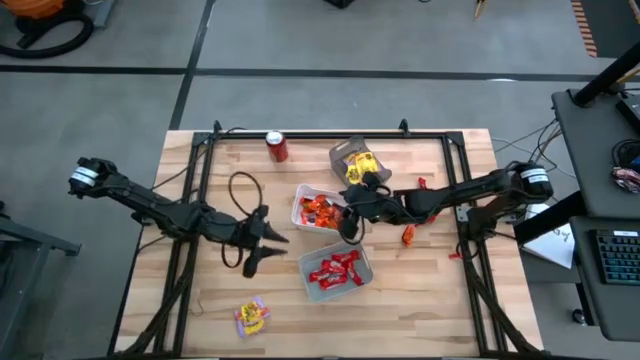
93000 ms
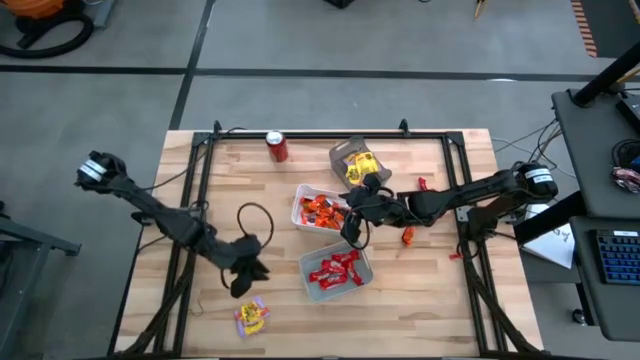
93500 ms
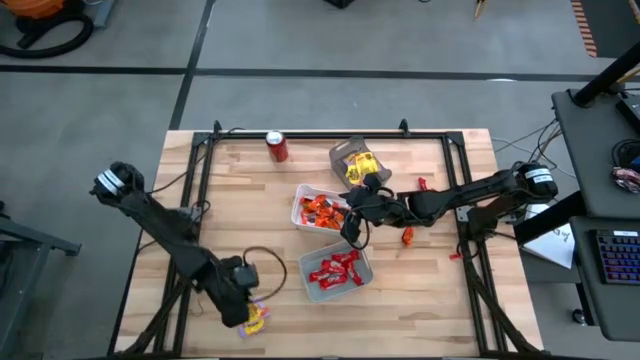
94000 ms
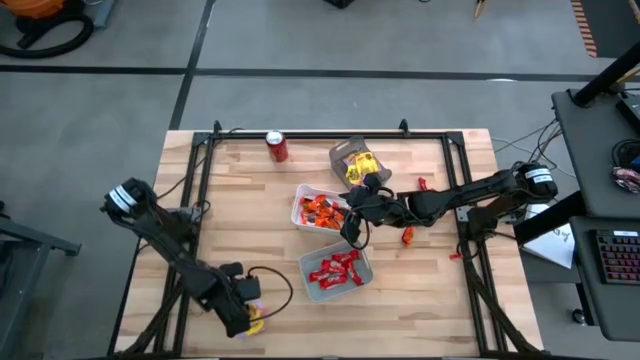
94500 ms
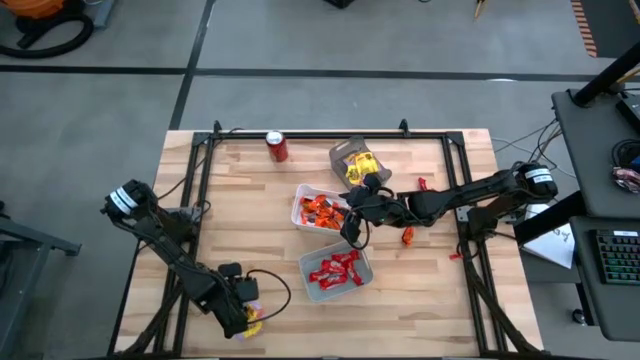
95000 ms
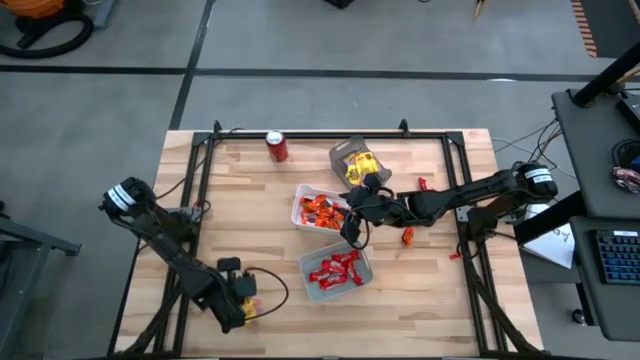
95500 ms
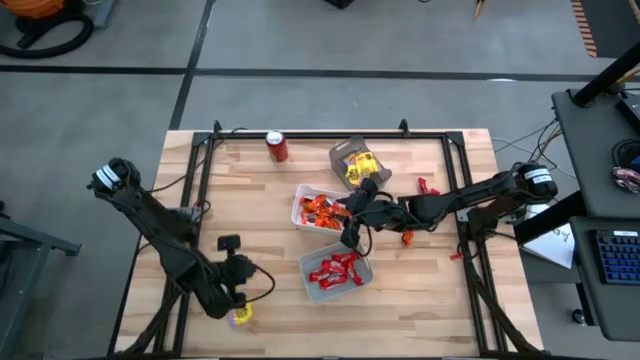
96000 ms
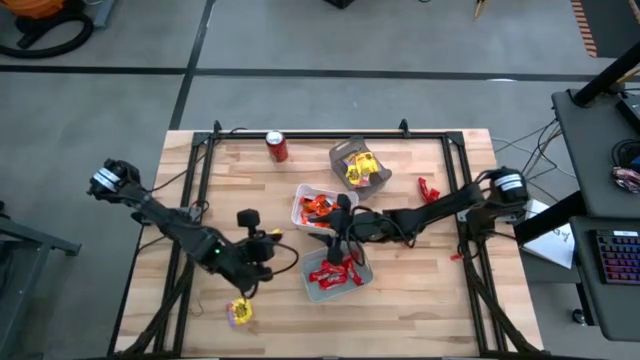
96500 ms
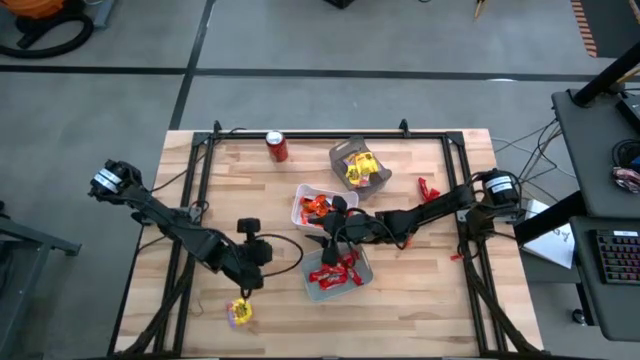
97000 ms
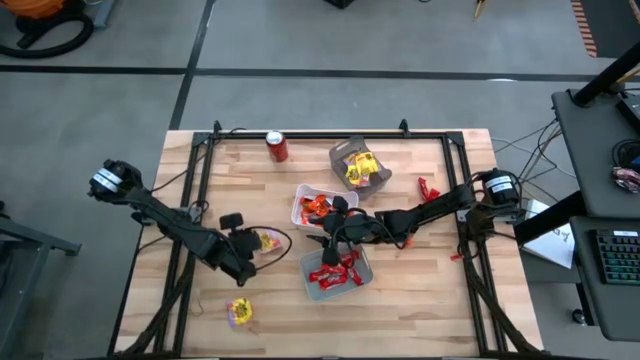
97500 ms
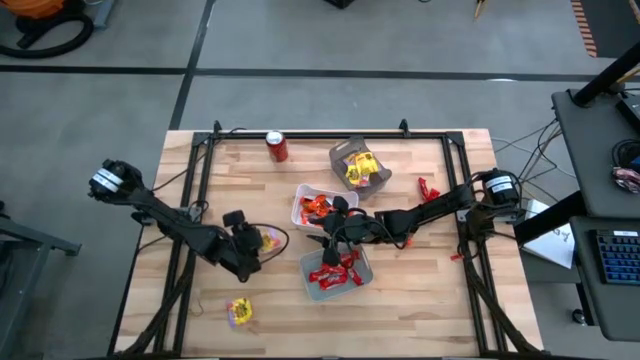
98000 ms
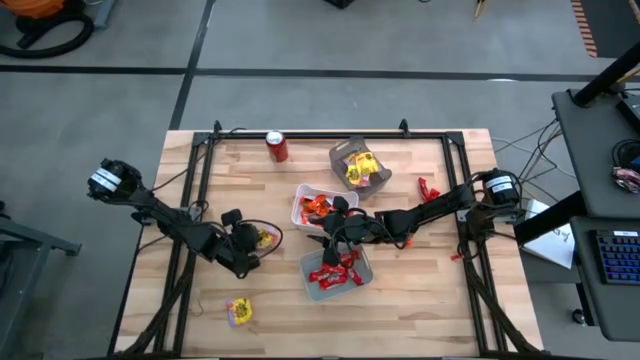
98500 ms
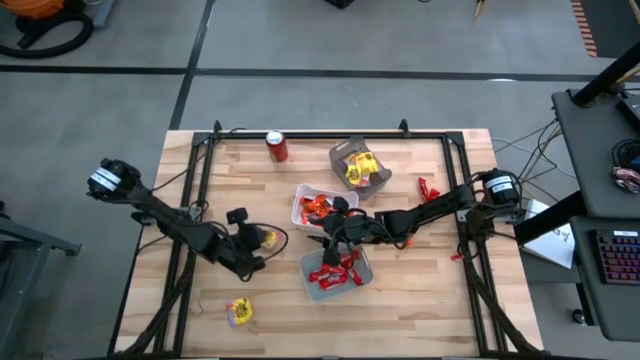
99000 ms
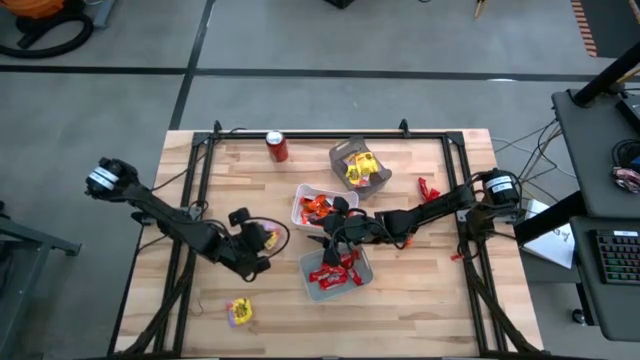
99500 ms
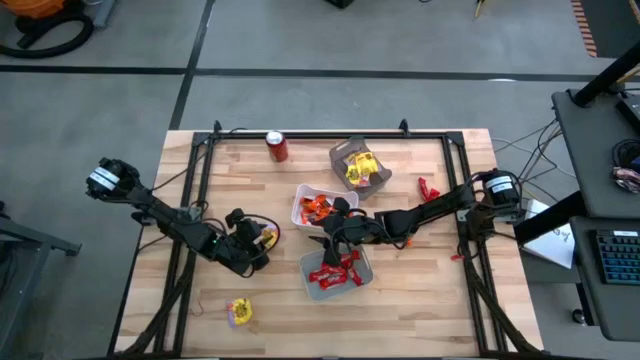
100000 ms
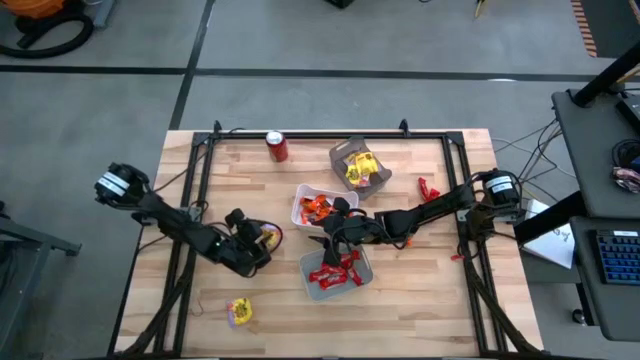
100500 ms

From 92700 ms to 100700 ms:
Task: Sort candy
Put the yellow candy pack into the black bin

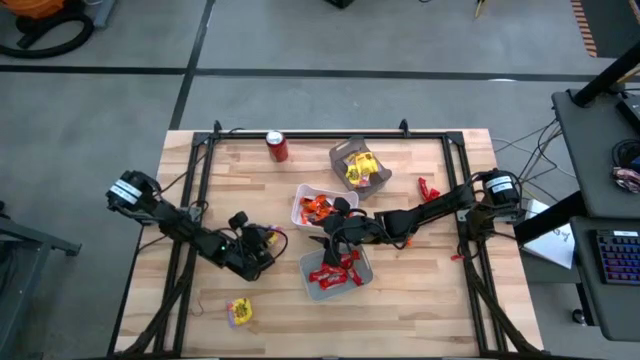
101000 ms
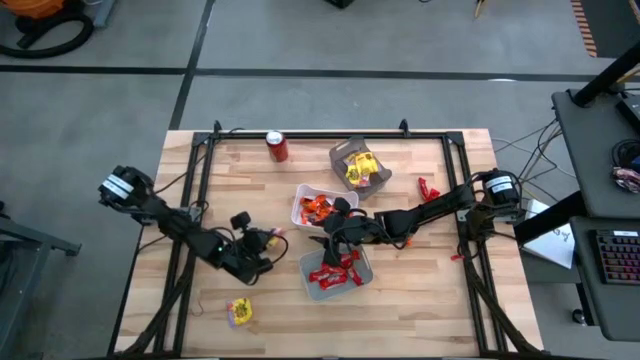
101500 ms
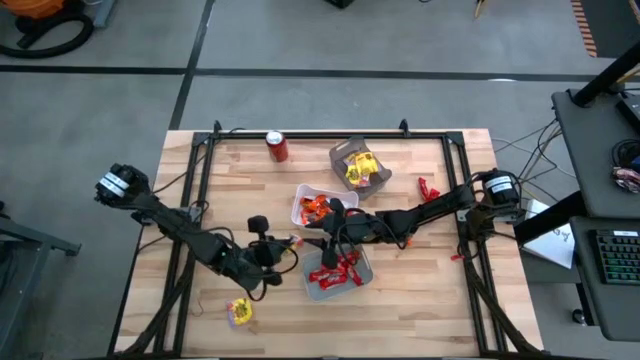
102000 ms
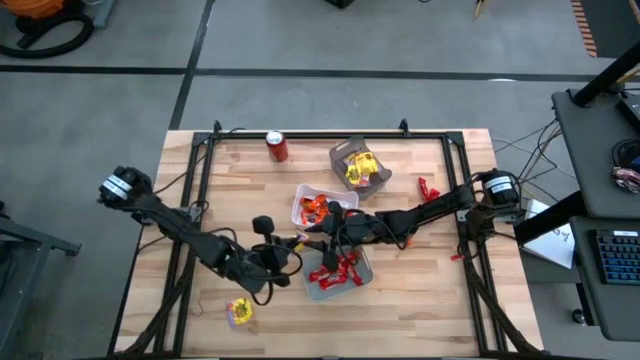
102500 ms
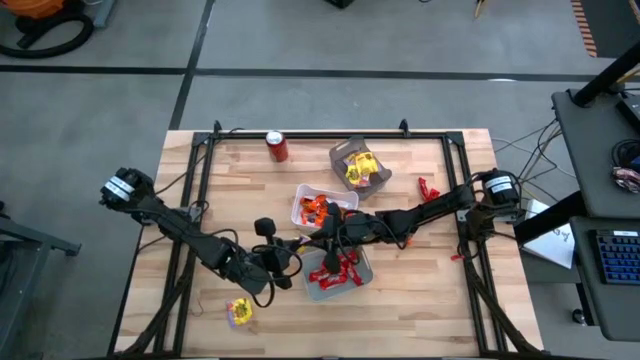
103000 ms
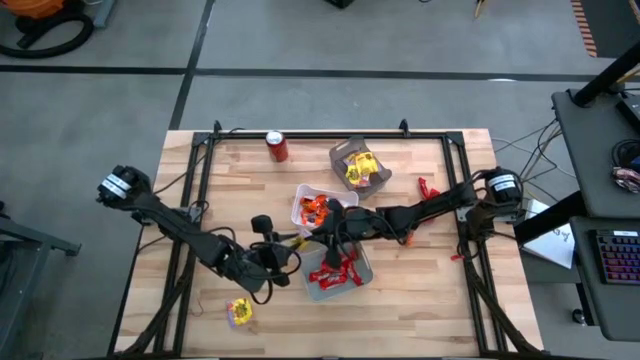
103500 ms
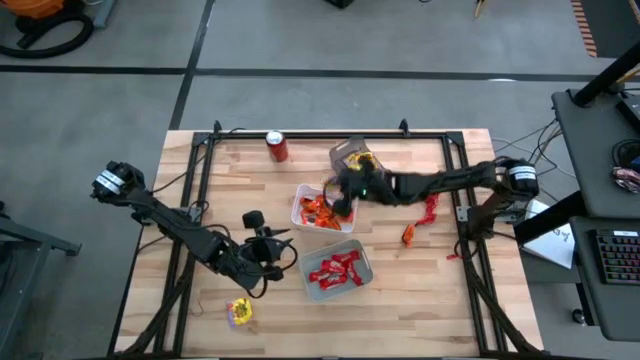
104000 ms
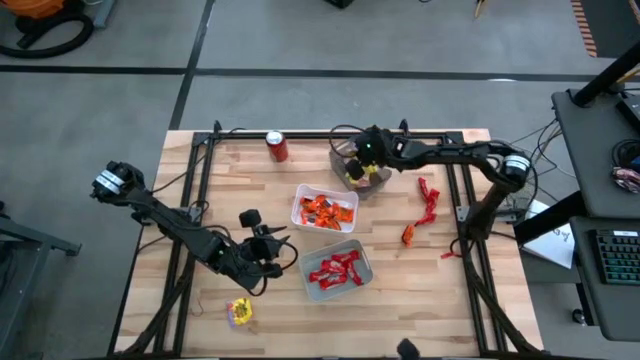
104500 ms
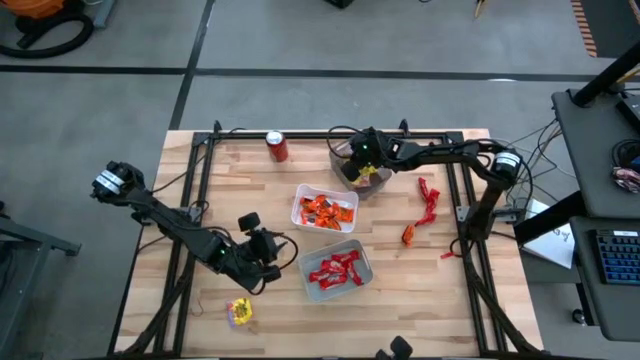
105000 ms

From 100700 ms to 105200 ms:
Put the yellow candy pack into the black bin

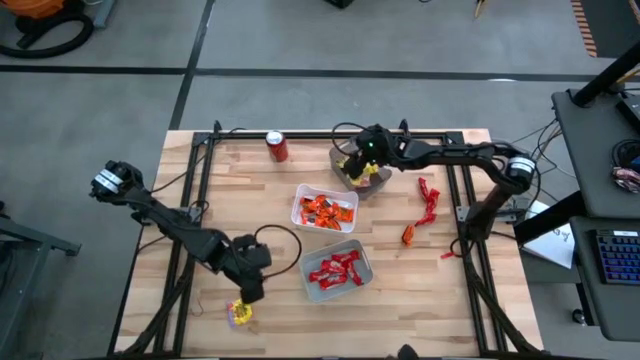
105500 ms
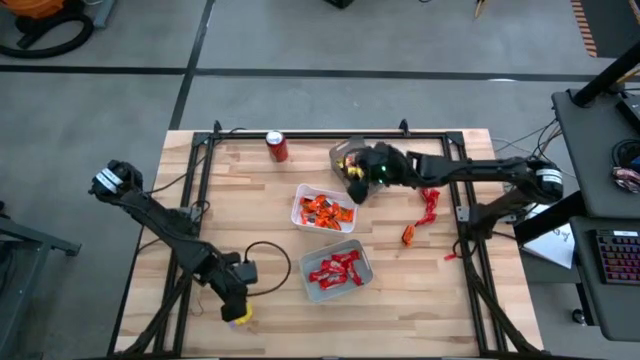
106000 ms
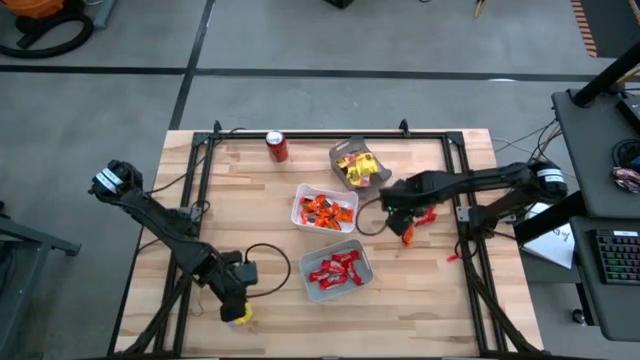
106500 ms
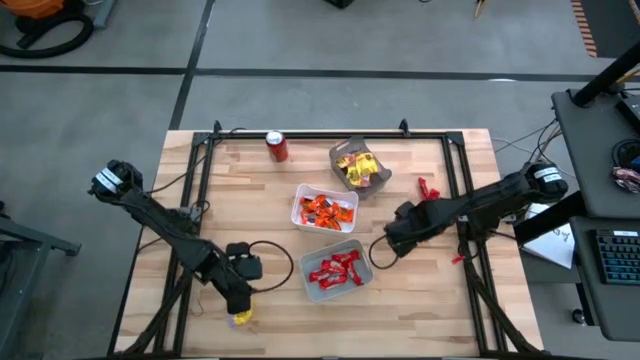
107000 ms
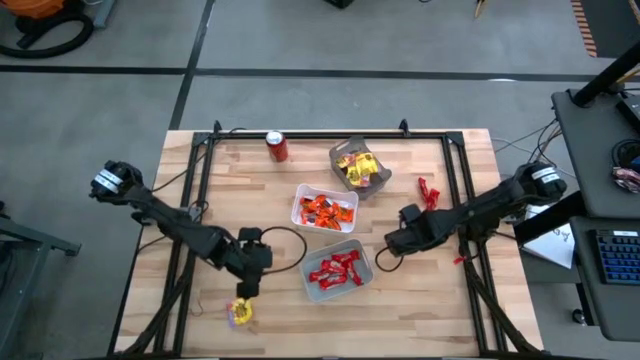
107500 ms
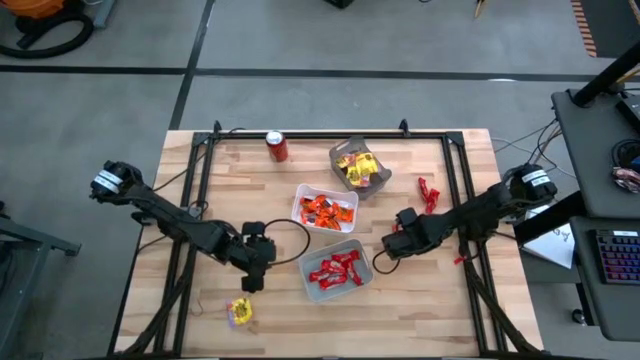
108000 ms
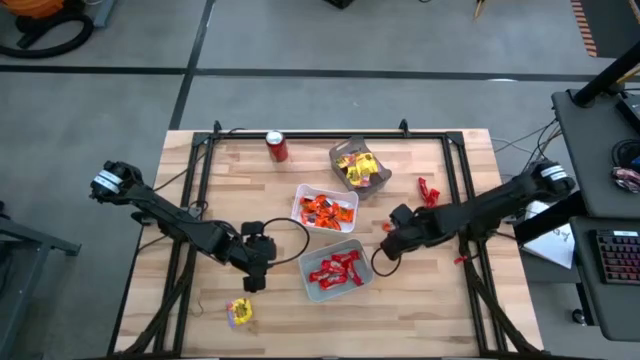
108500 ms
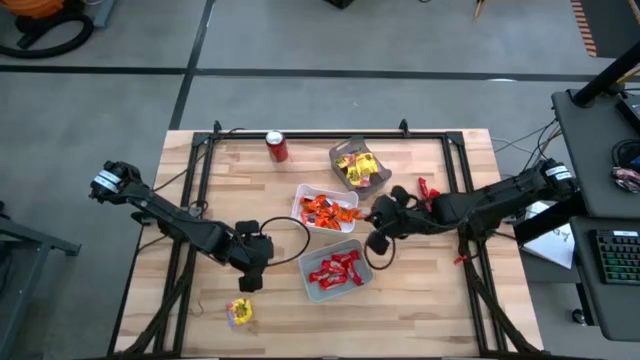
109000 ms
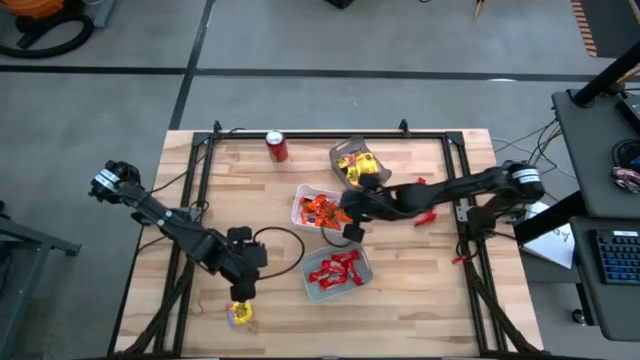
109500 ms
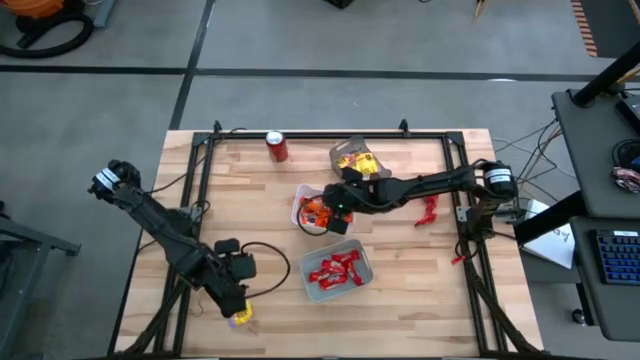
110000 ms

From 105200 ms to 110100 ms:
Put the orange chocolate pack into the white bin

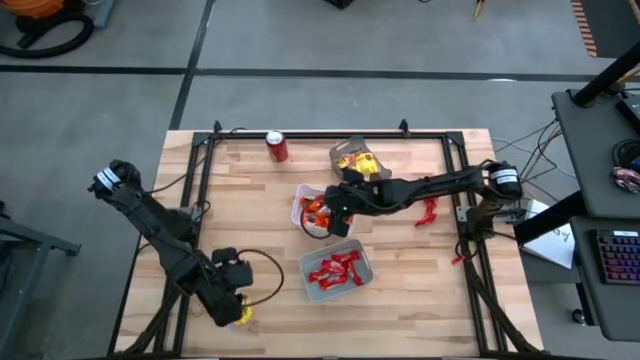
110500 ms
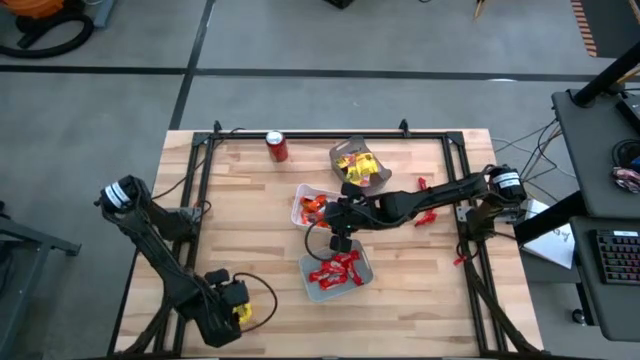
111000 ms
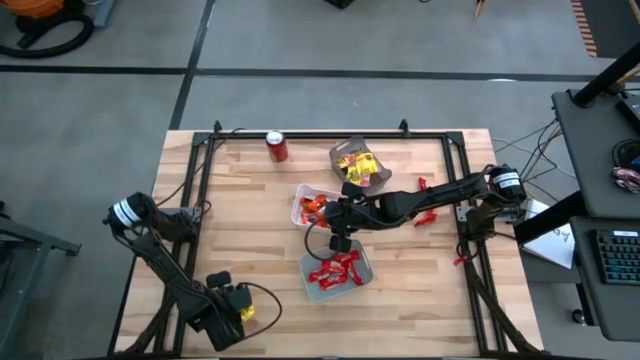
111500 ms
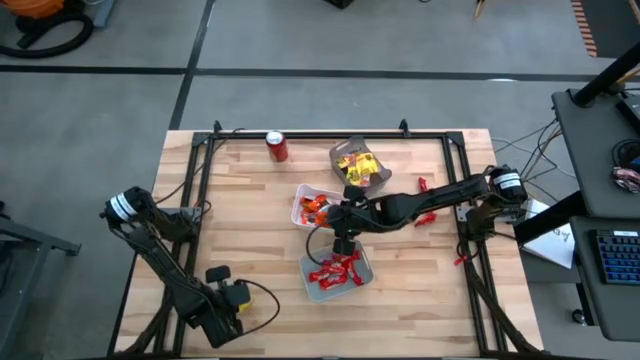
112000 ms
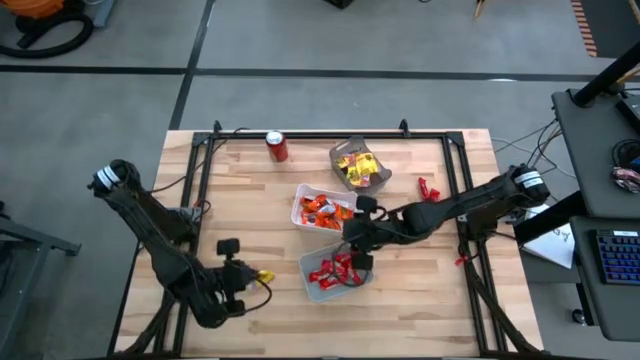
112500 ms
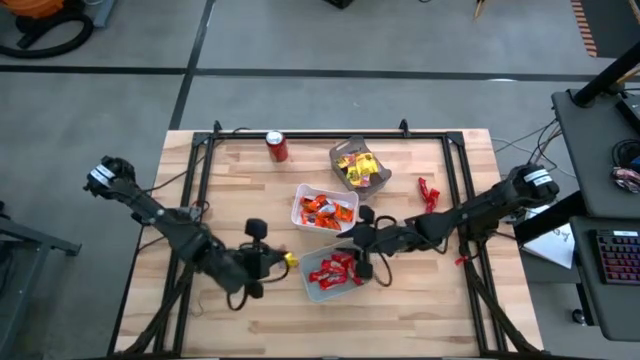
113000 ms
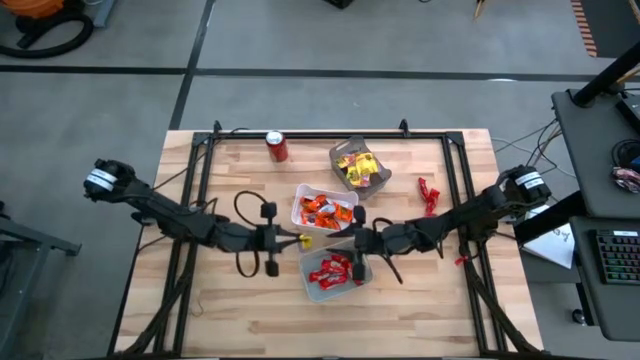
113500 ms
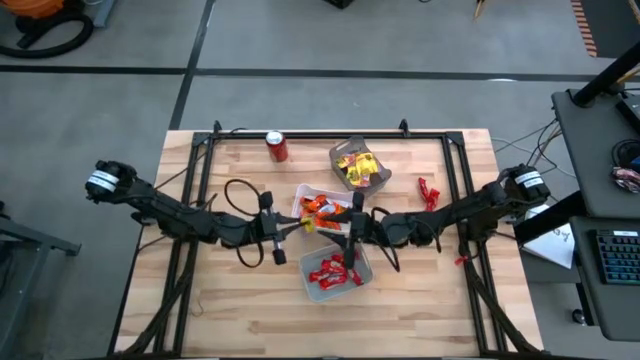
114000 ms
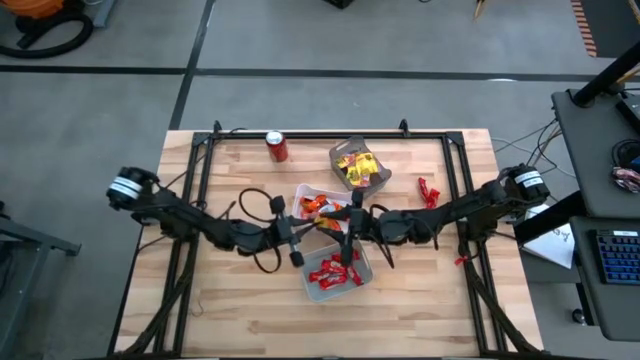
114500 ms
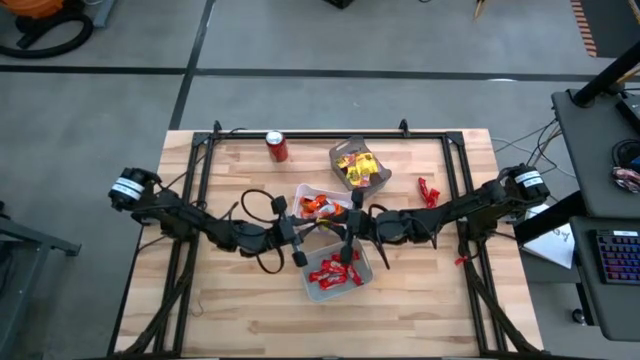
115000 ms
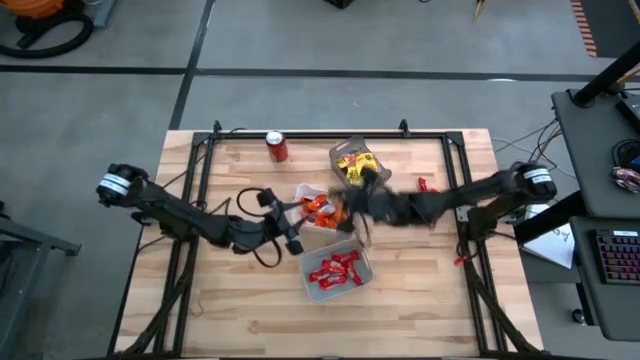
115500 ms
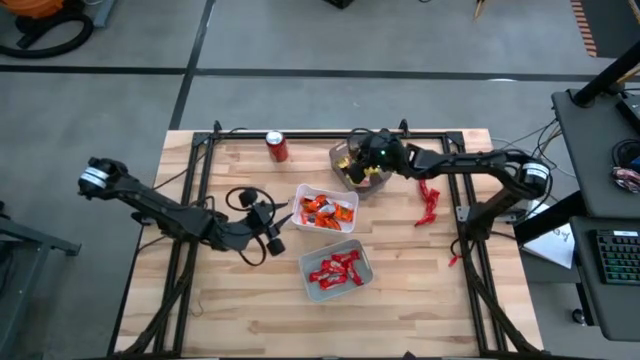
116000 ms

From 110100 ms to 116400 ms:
Put the yellow candy pack into the black bin
